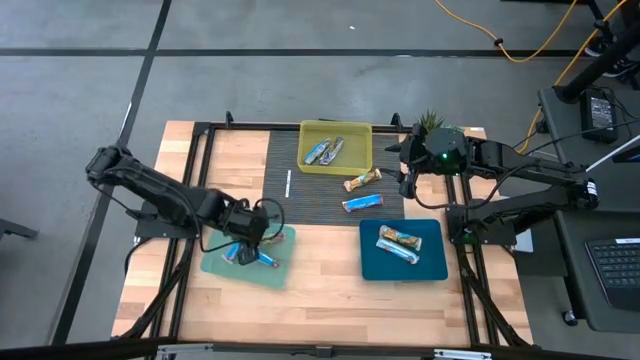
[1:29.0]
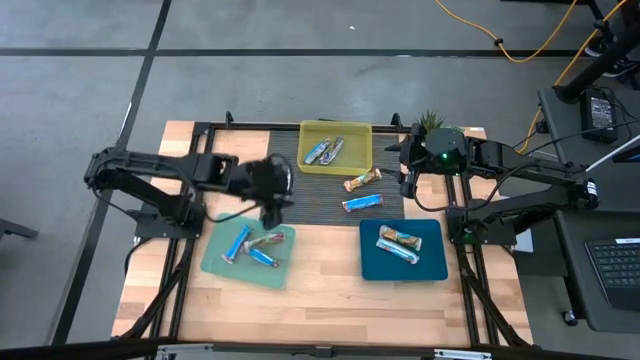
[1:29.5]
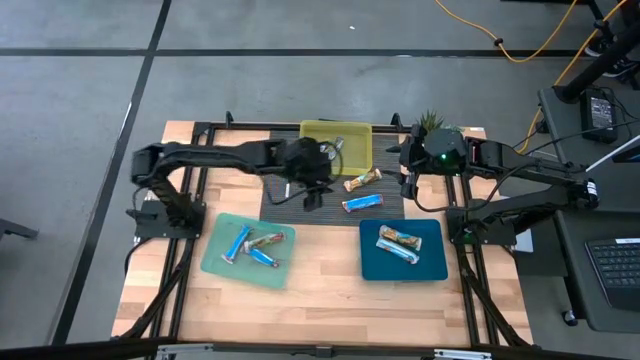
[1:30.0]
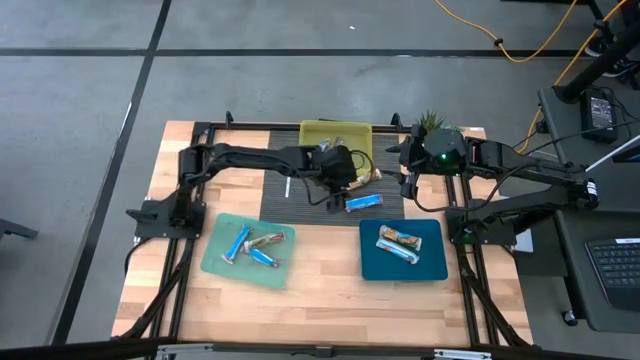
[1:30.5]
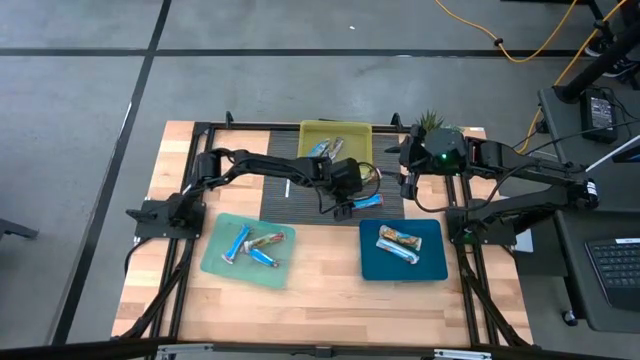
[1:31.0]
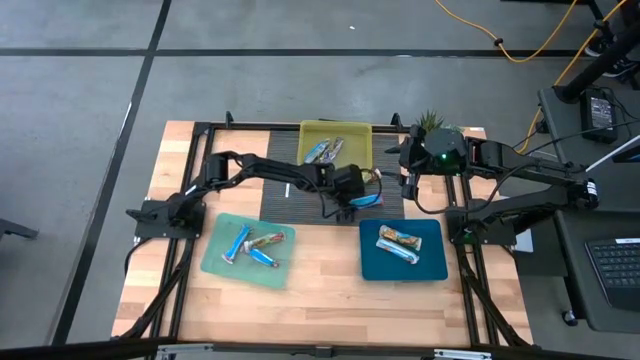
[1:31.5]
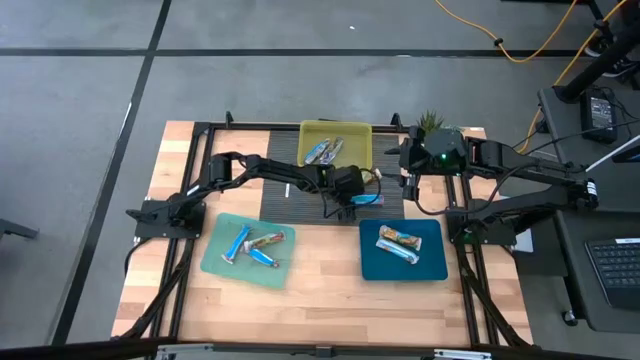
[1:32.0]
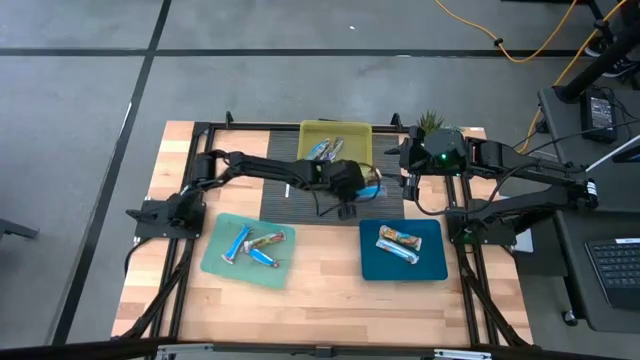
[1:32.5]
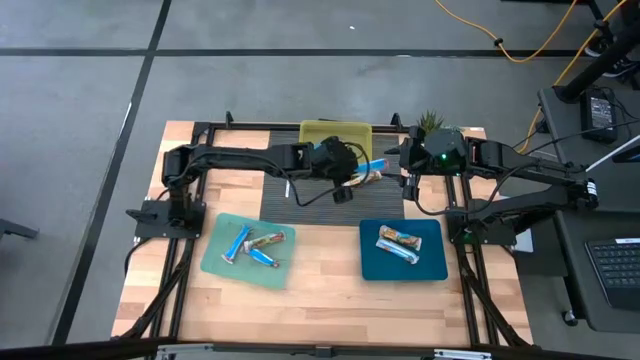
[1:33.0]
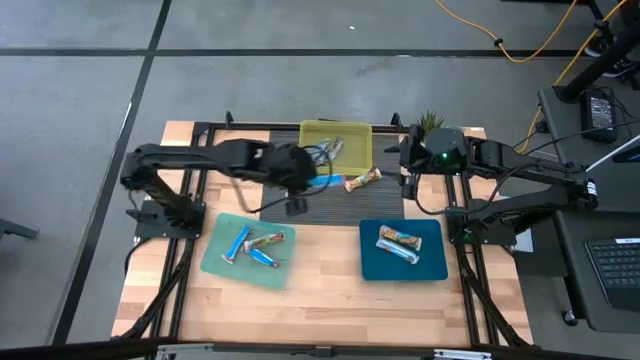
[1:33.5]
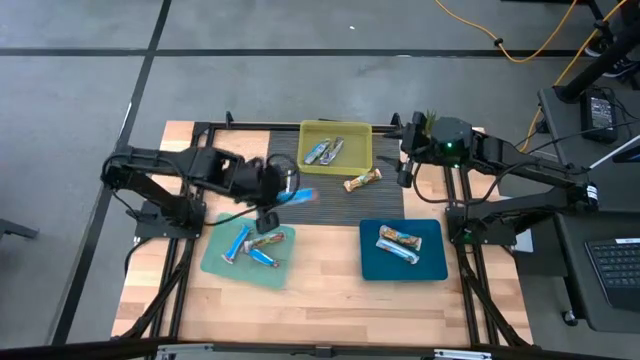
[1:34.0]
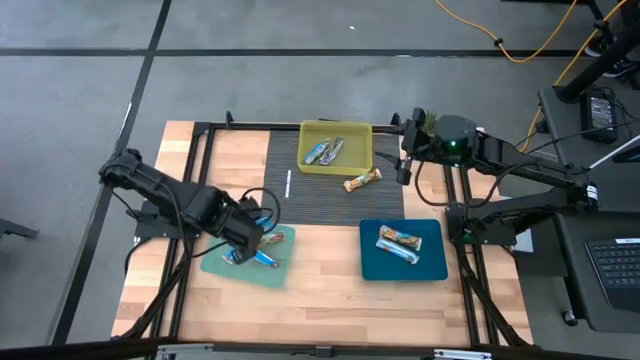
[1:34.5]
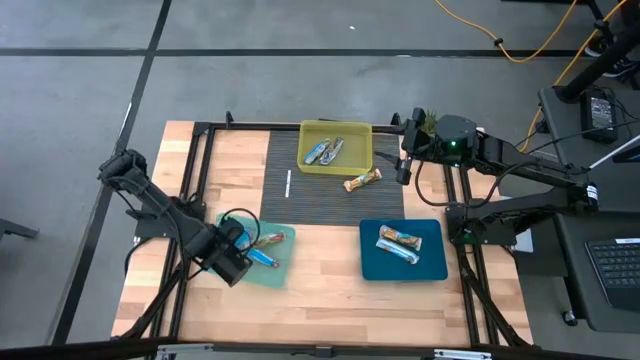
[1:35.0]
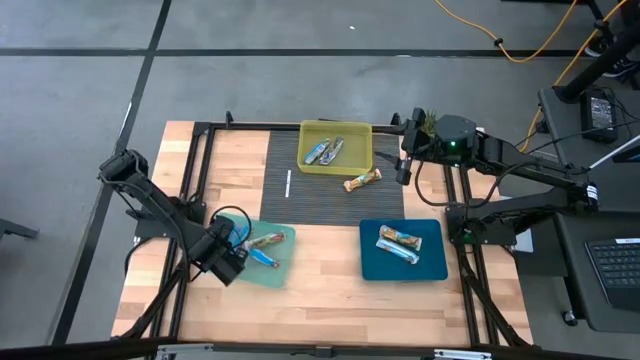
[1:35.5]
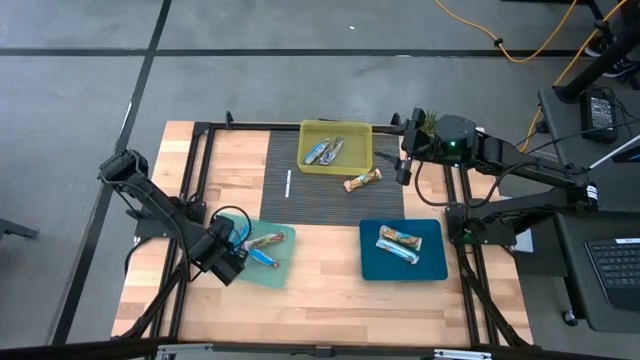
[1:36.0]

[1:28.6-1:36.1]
Task: Pick and place Granola Bars by type
Put the red granola bar into the green bin

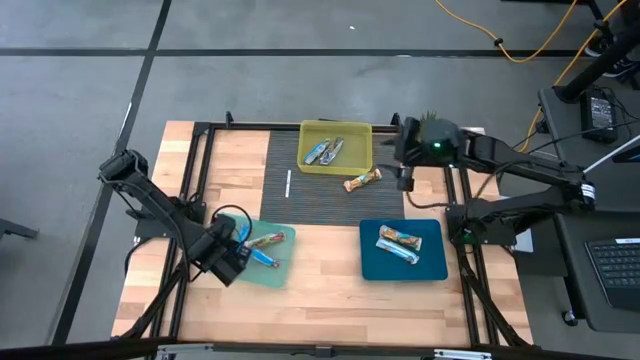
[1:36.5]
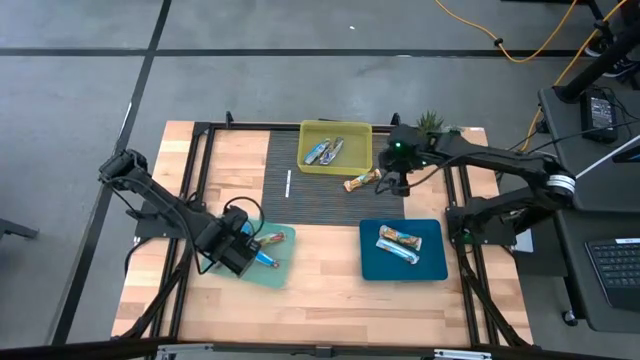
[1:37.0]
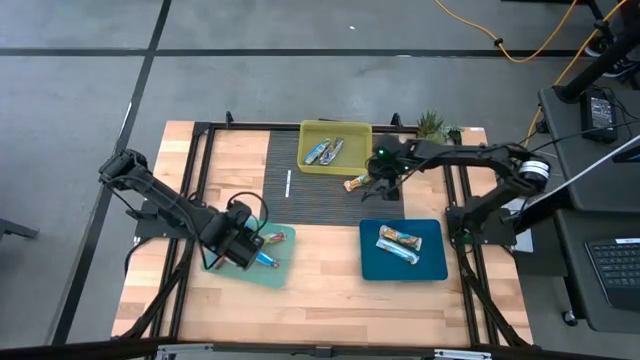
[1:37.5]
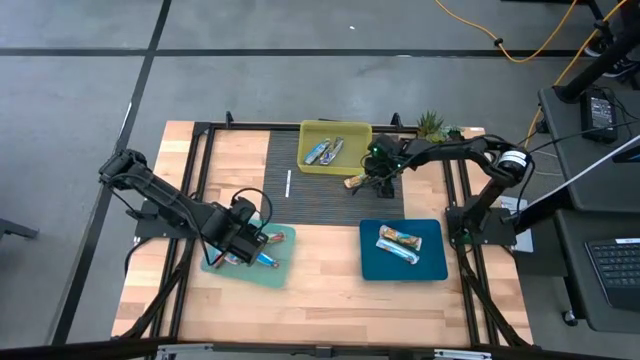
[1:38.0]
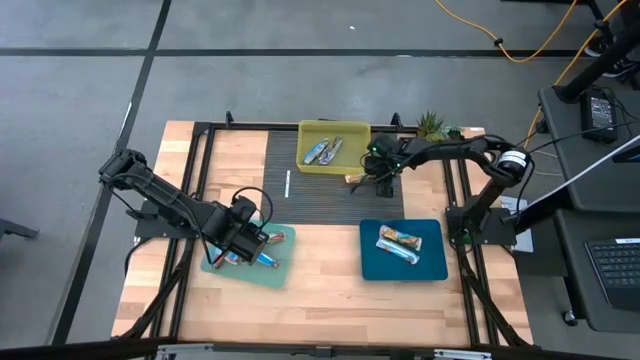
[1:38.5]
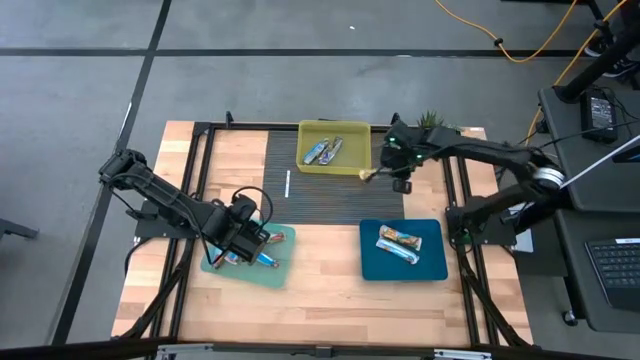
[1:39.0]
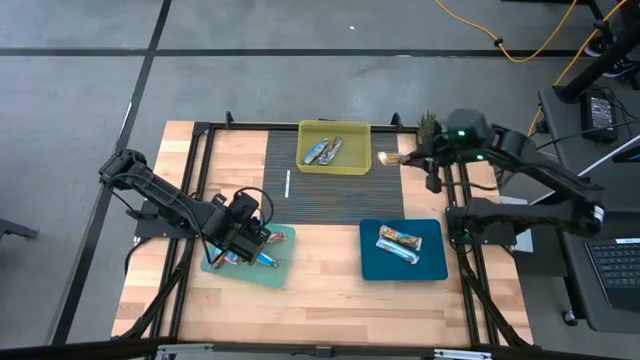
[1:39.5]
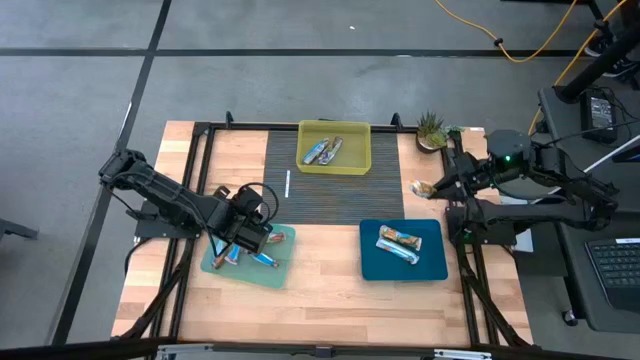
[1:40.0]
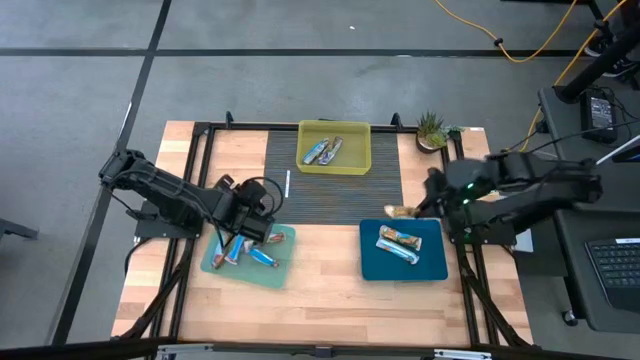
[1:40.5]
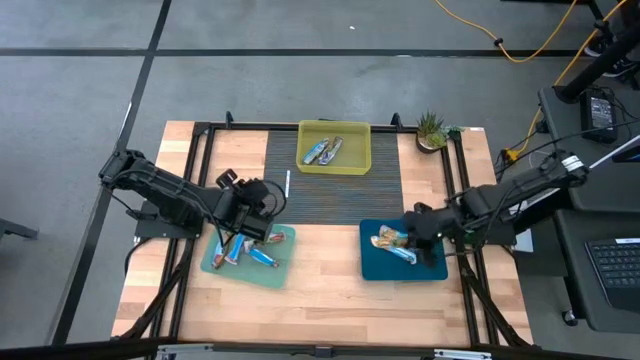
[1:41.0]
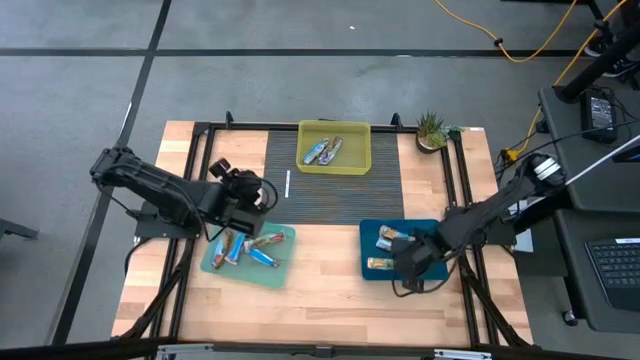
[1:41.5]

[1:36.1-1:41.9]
Put the yellow granola bar into the blue bin

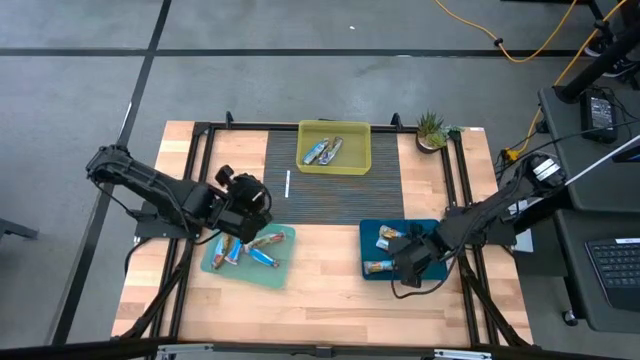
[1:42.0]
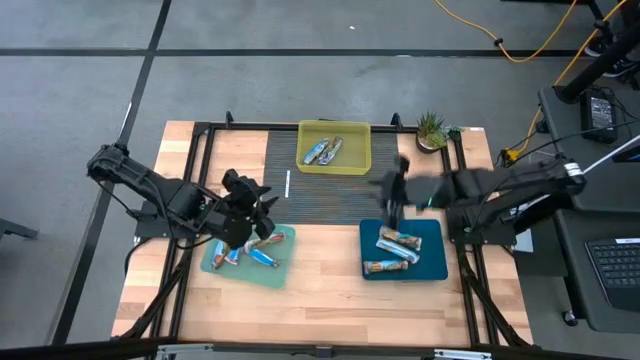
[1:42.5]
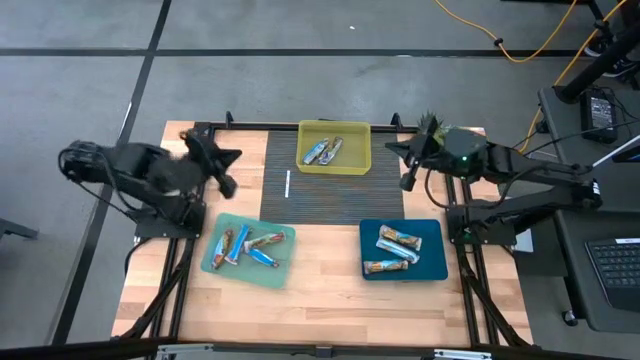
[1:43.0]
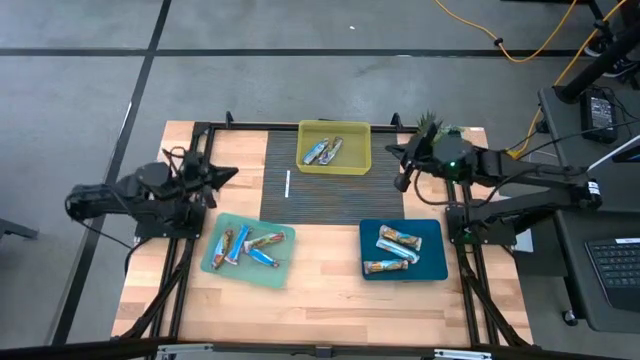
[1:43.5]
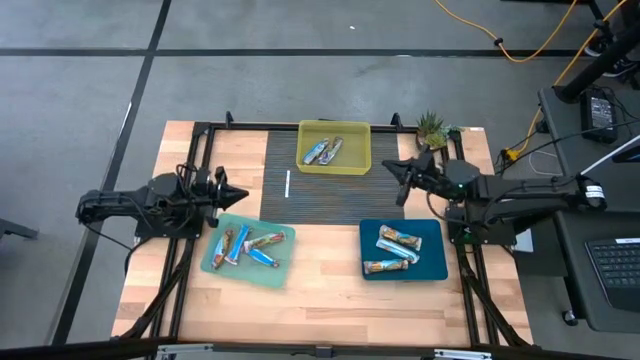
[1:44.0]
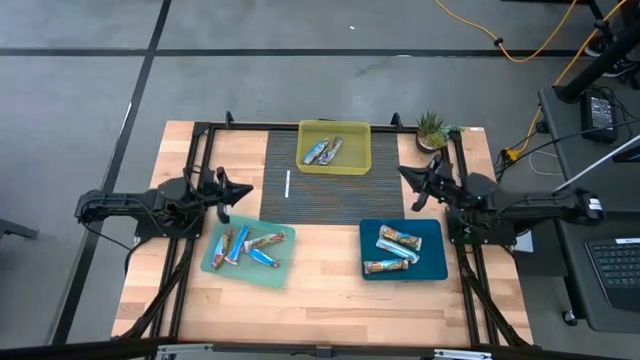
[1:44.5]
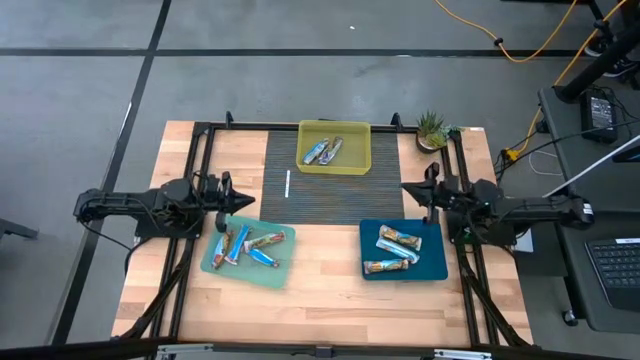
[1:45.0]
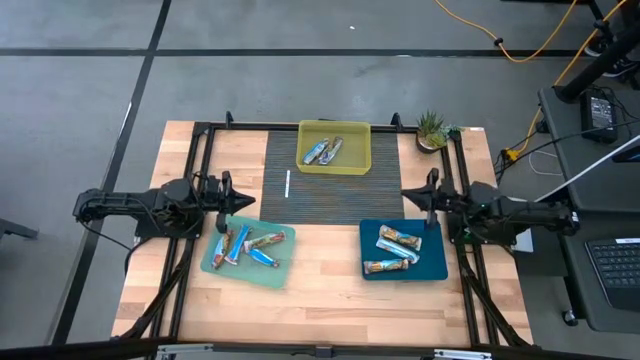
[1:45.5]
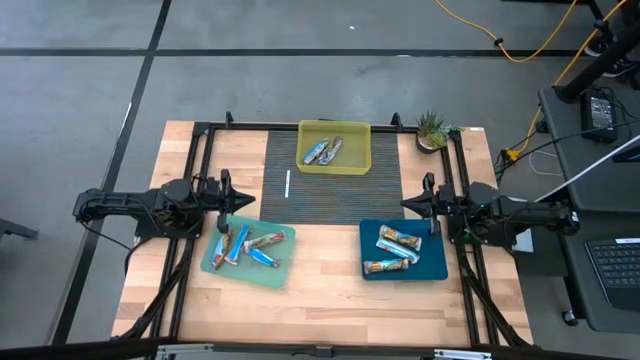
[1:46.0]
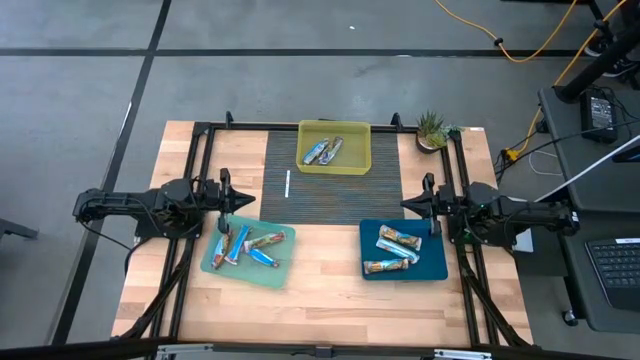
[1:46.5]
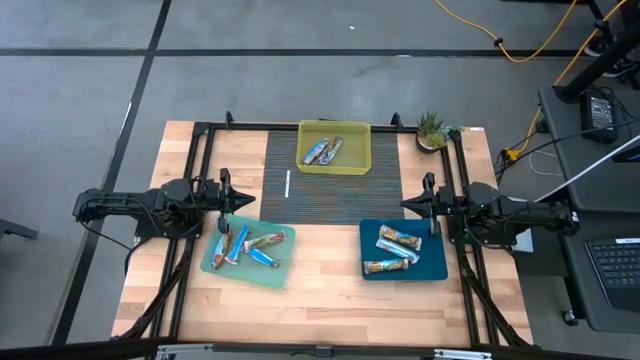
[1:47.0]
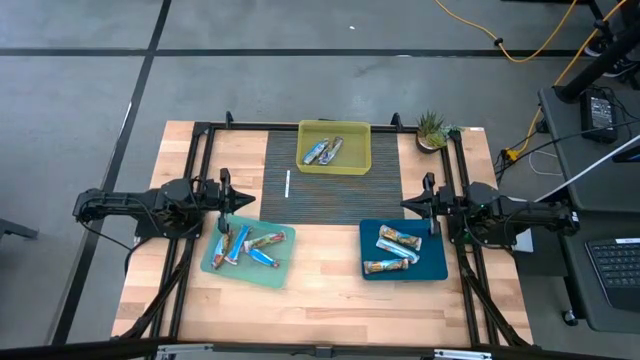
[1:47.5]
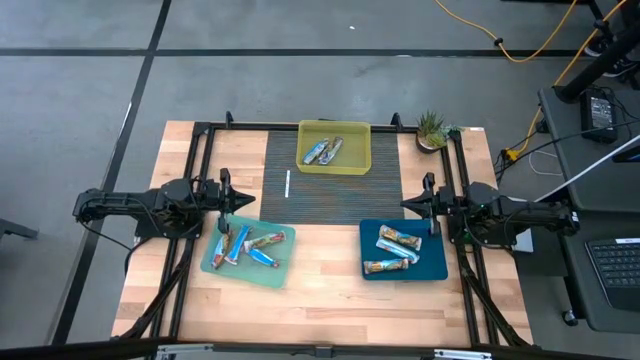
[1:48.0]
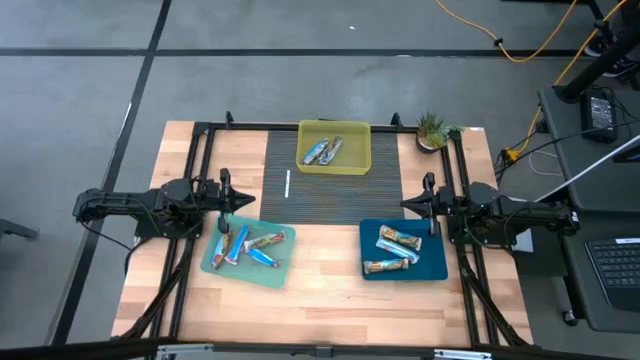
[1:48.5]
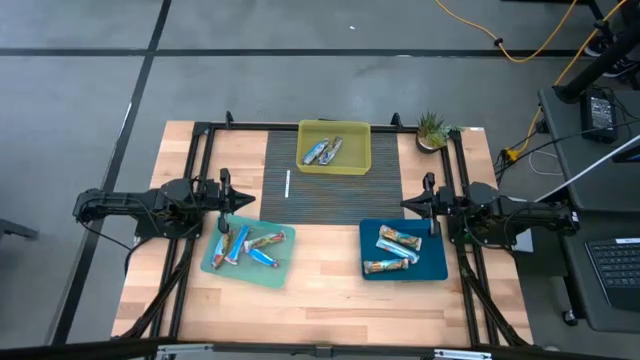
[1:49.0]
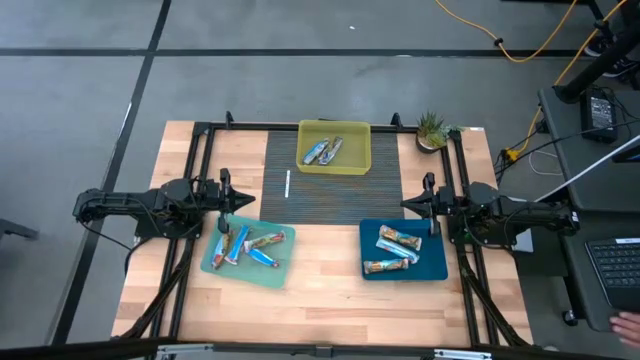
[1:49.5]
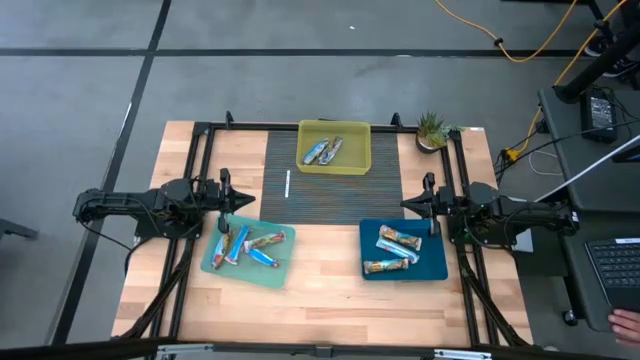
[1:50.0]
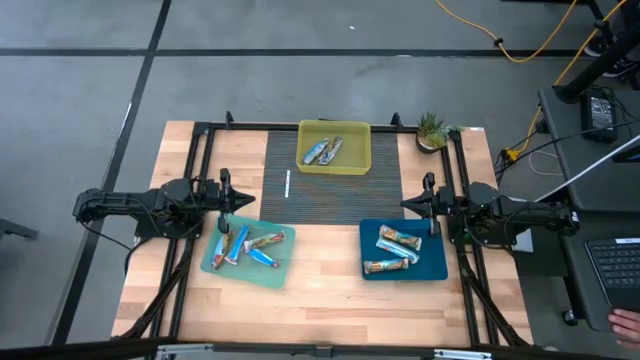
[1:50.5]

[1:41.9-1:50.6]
Return to Home Position
